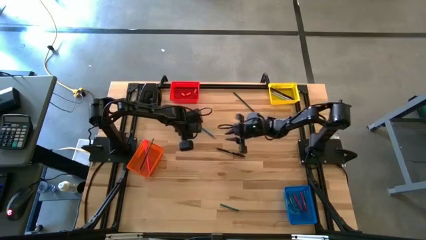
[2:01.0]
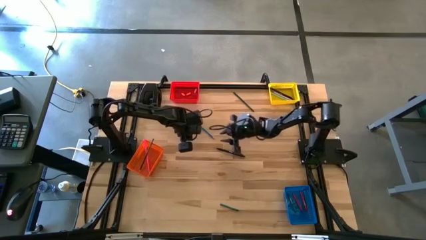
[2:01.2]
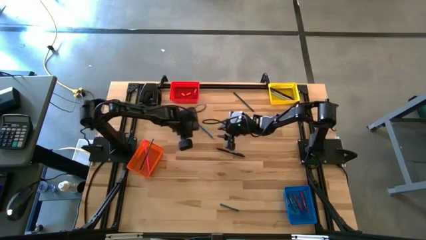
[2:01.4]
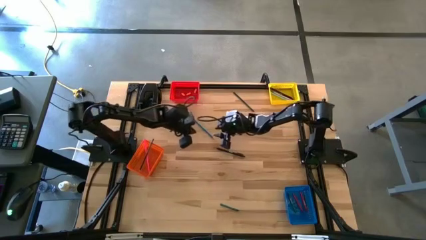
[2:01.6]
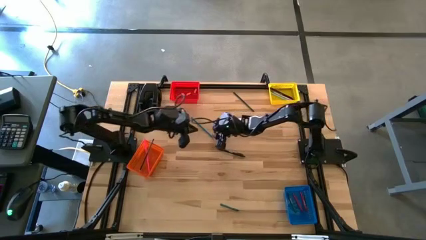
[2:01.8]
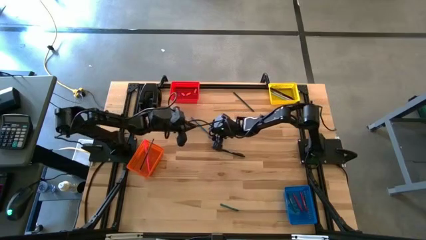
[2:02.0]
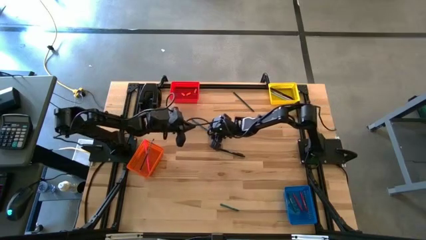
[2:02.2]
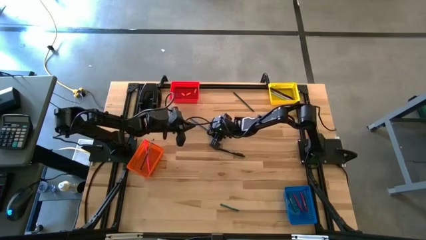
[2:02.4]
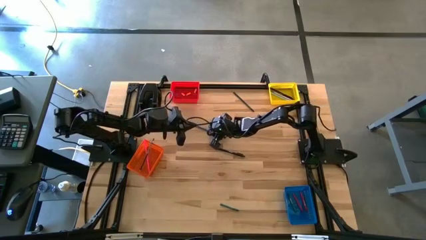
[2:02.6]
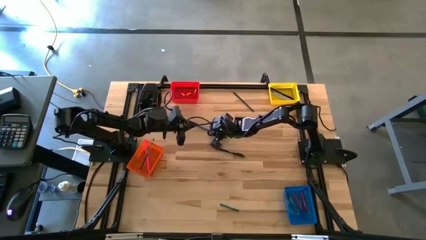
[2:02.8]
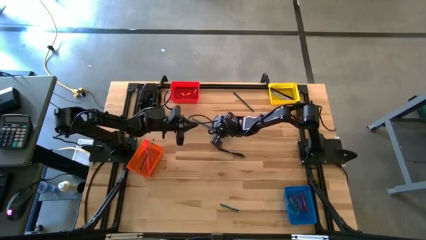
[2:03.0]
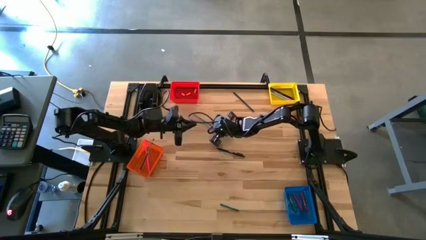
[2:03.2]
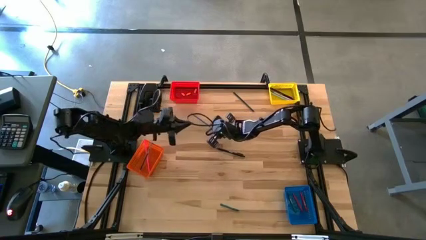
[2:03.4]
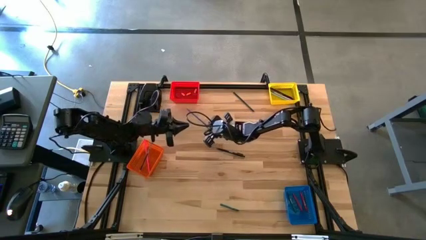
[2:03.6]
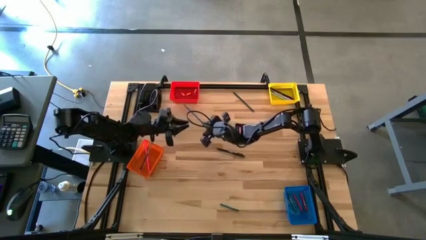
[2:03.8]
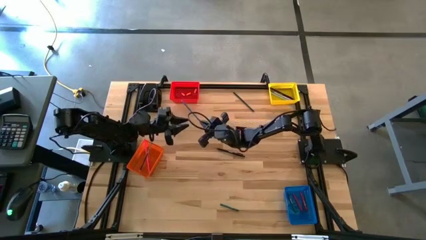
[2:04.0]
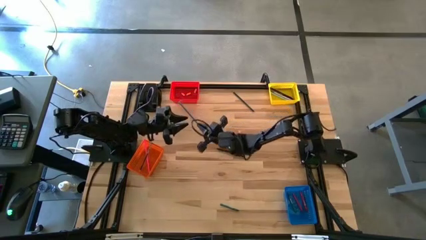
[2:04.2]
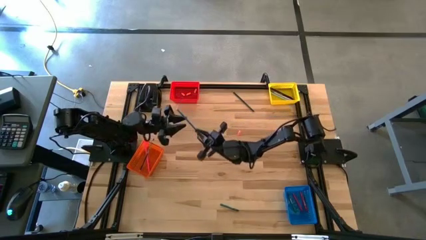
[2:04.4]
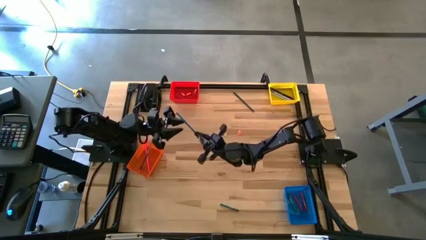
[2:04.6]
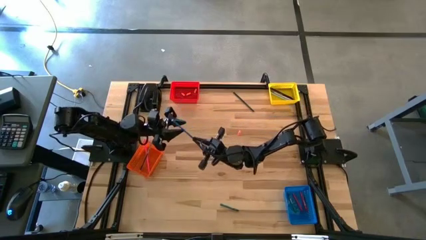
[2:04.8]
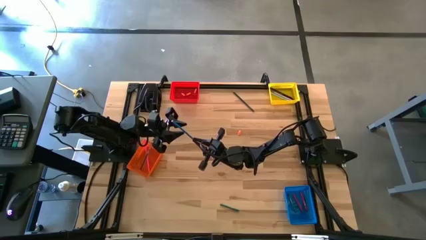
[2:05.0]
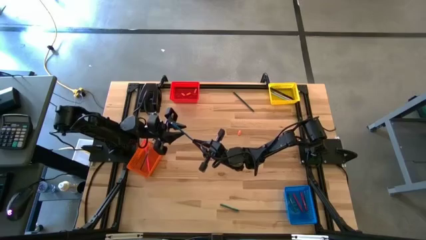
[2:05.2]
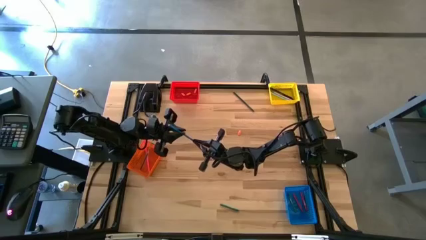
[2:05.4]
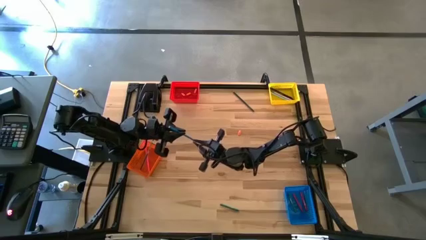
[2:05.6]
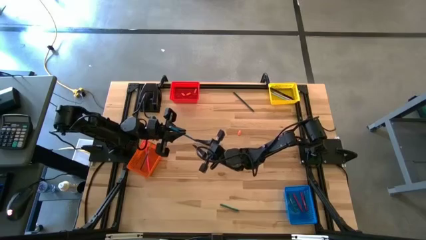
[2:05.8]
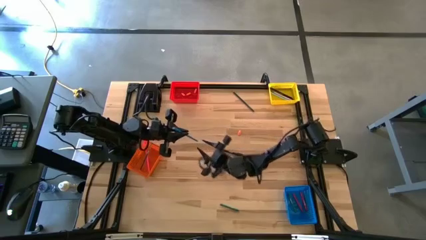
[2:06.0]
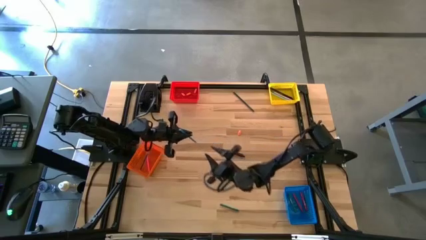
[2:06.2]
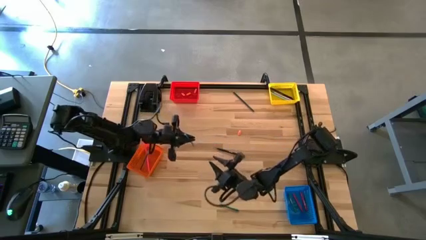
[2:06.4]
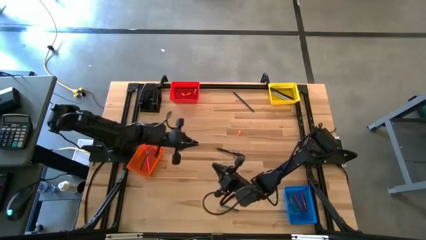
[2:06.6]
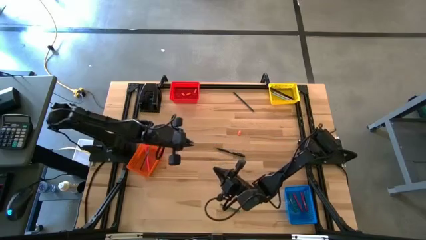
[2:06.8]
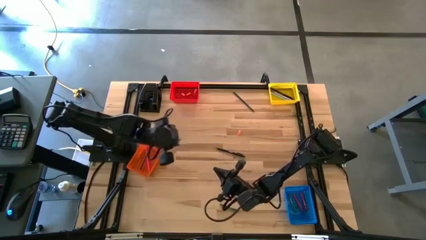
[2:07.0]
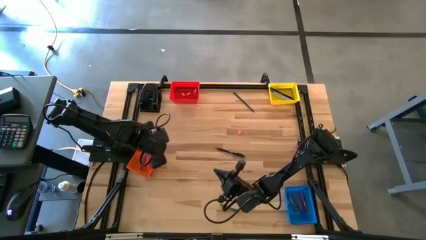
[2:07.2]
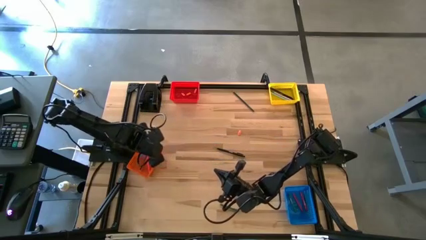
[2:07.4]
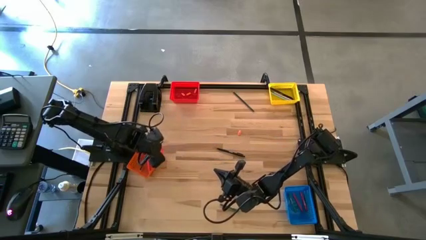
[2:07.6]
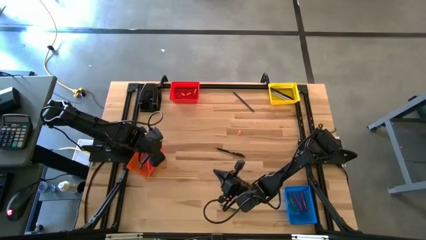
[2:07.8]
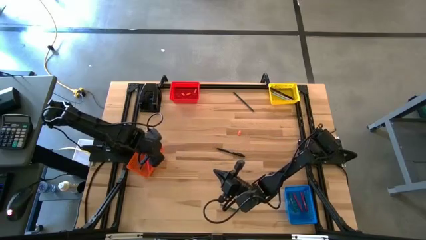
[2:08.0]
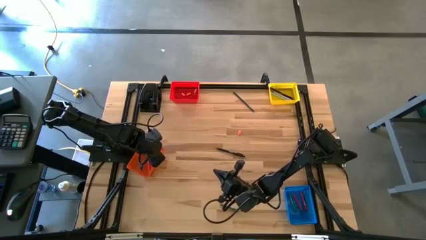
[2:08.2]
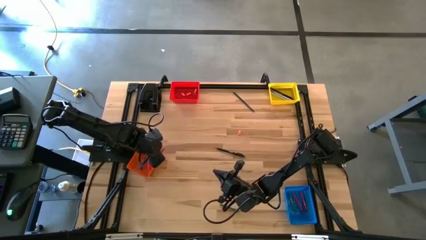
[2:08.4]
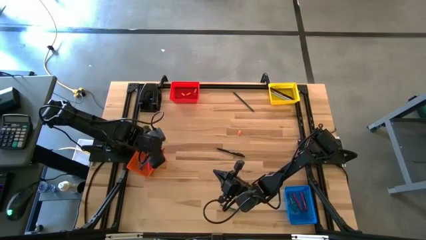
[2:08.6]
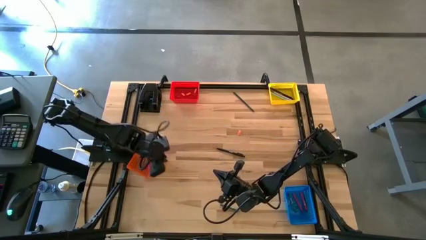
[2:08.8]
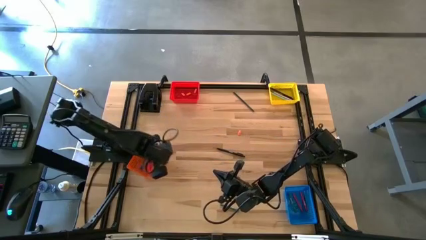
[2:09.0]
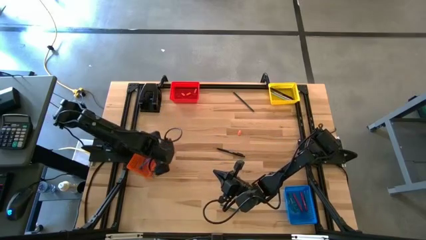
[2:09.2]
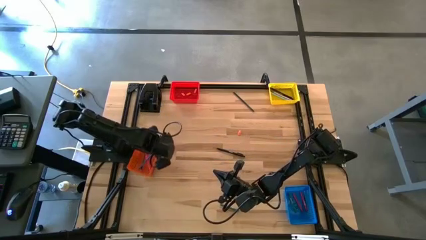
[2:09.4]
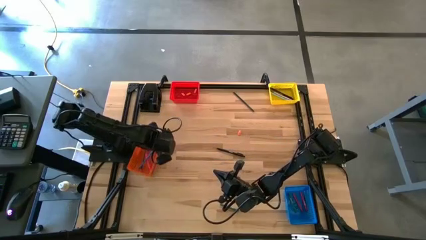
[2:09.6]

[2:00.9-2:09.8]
Task: Sort crayons/erasers/pens/pencils in bins
Put the blue pencil into the orange basket

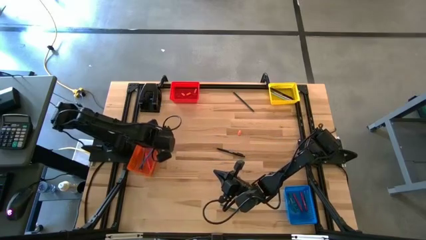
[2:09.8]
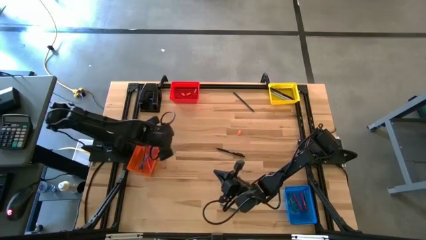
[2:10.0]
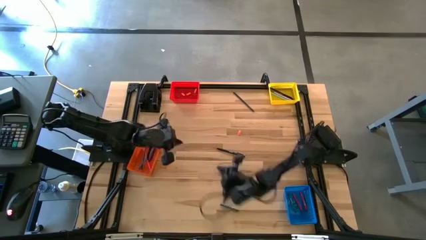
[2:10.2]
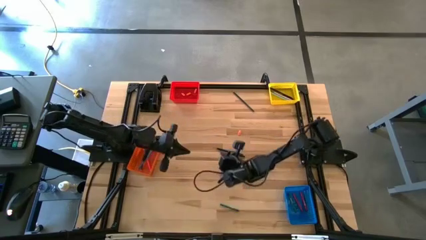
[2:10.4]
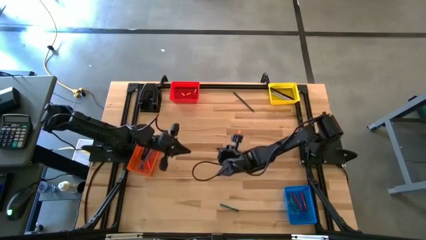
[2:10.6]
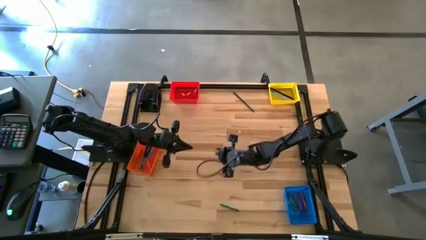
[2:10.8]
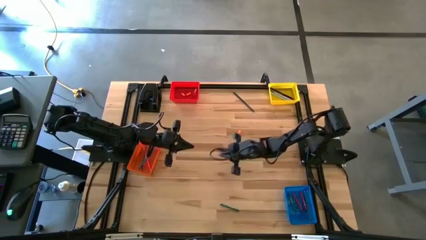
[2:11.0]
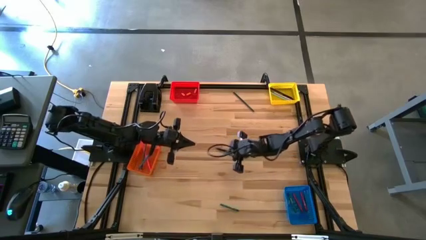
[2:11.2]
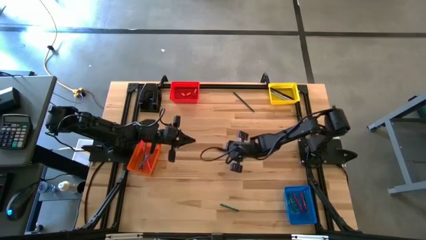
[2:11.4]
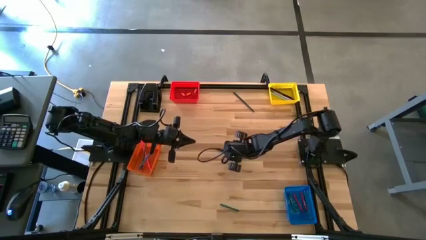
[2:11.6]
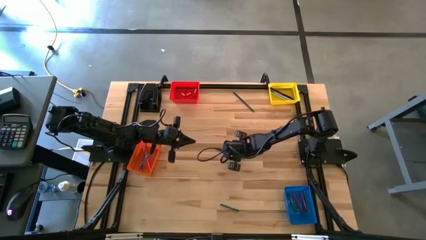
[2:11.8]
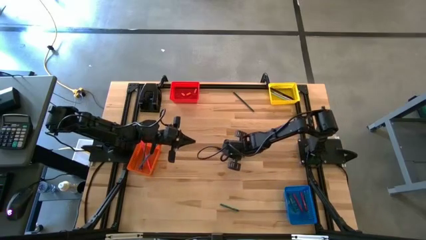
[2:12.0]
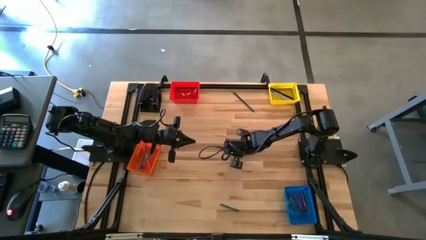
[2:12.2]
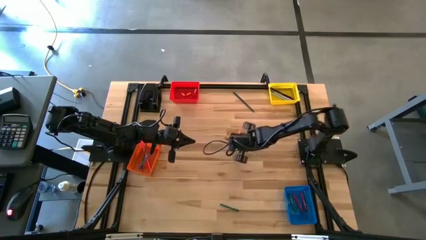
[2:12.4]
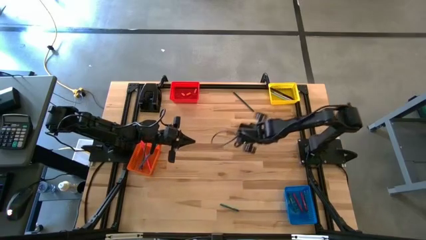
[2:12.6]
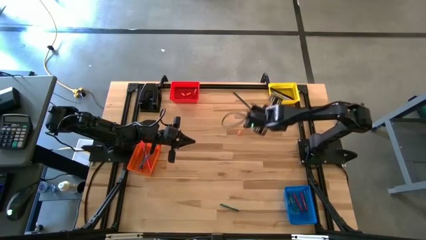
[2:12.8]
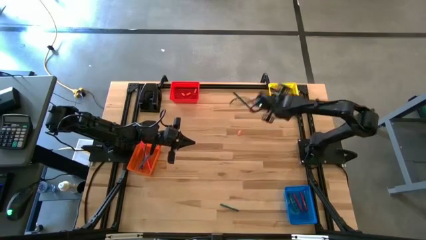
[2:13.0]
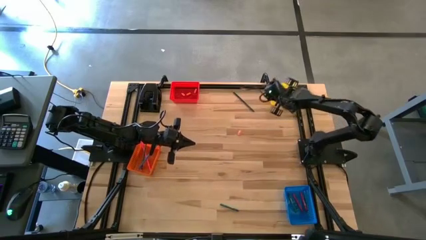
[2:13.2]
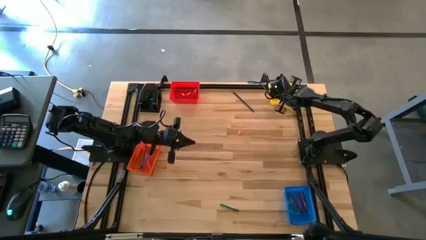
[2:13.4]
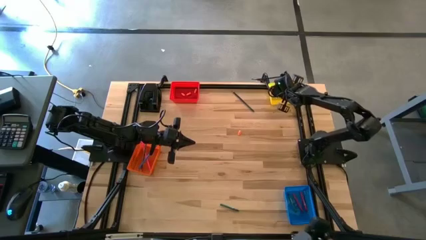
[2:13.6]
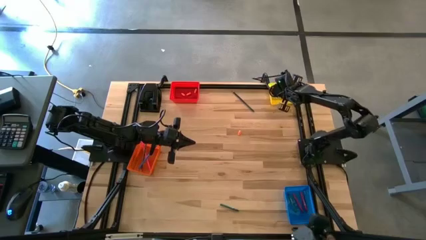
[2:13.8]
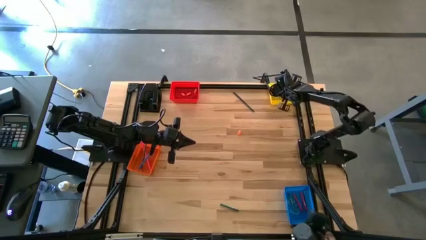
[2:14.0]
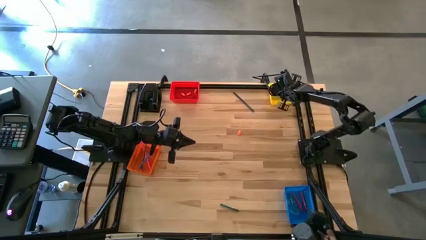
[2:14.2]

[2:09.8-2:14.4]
Put the black pen into the yellow basket
